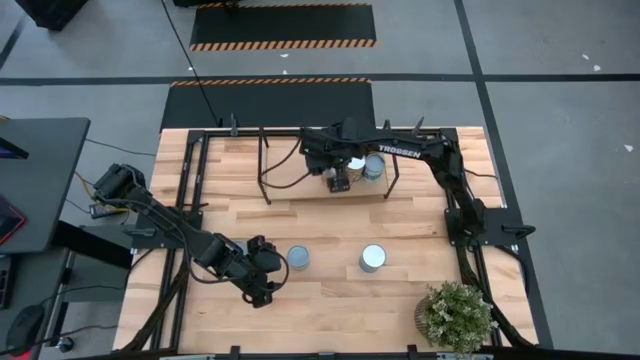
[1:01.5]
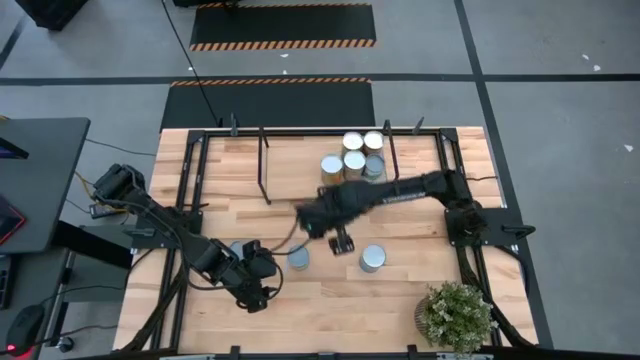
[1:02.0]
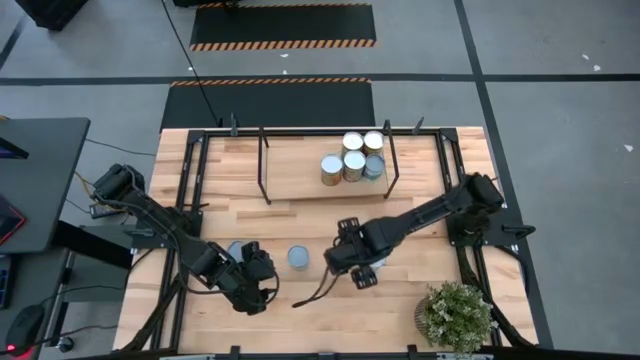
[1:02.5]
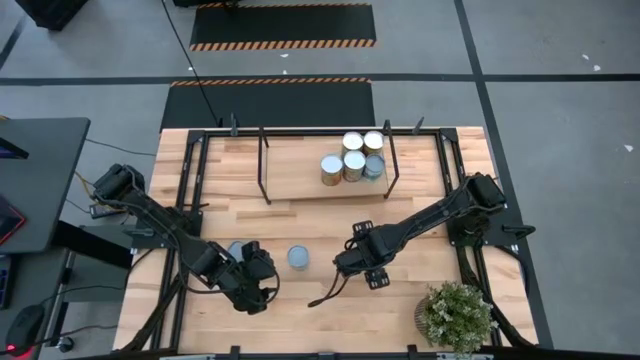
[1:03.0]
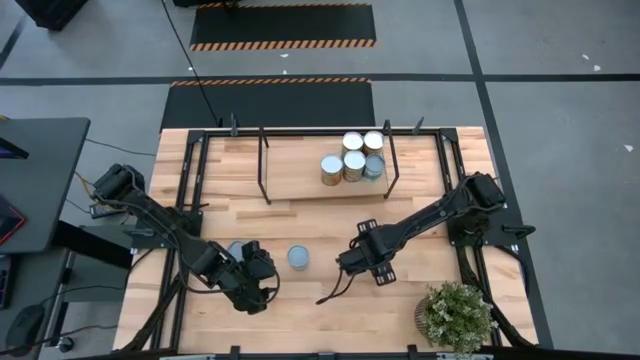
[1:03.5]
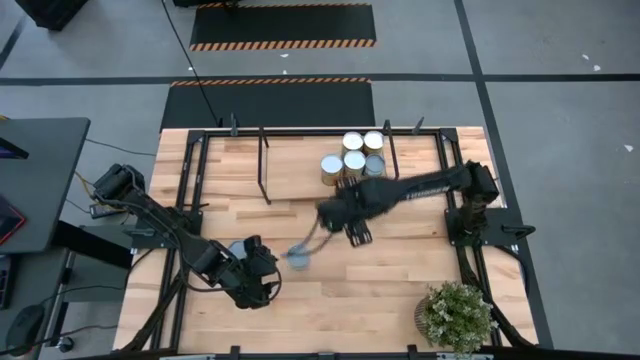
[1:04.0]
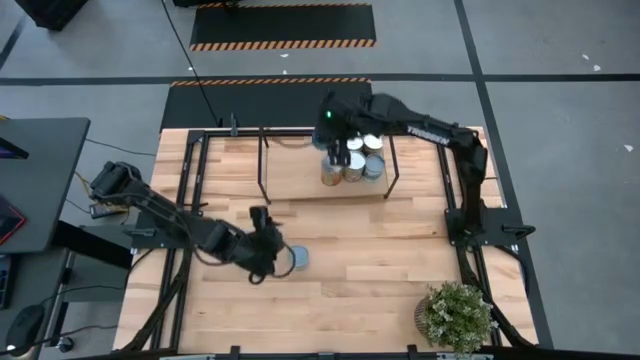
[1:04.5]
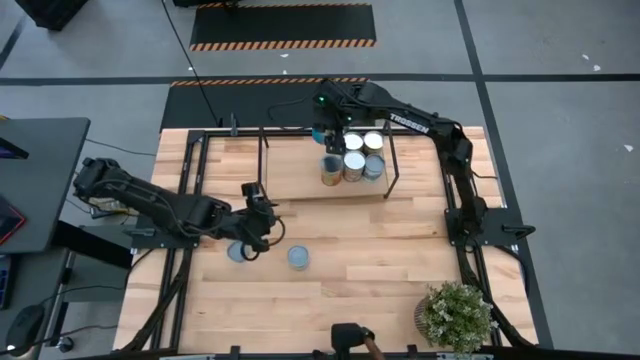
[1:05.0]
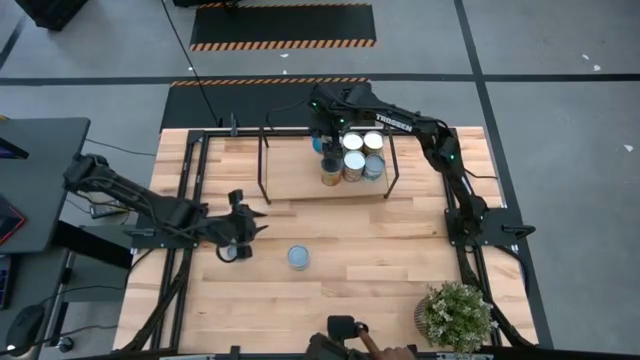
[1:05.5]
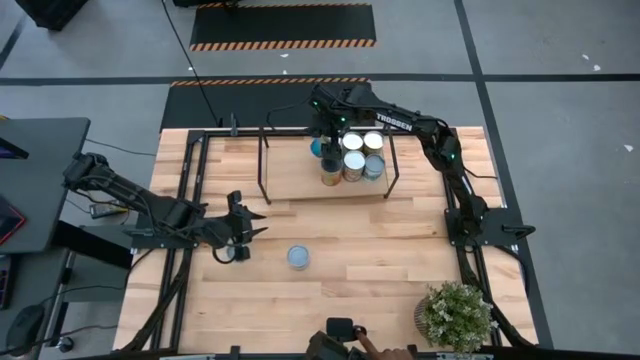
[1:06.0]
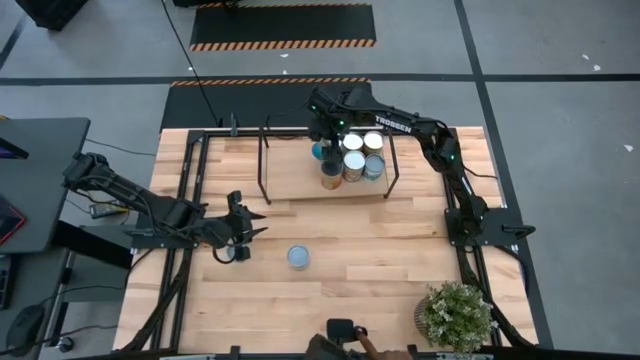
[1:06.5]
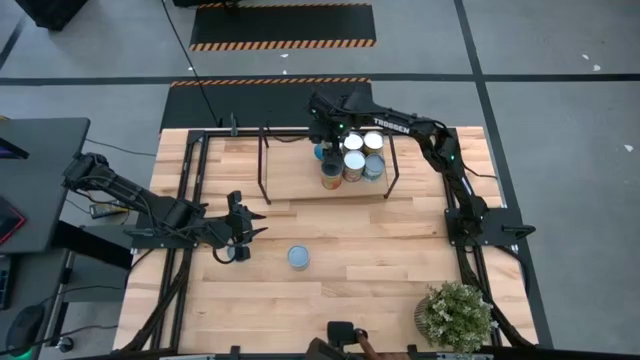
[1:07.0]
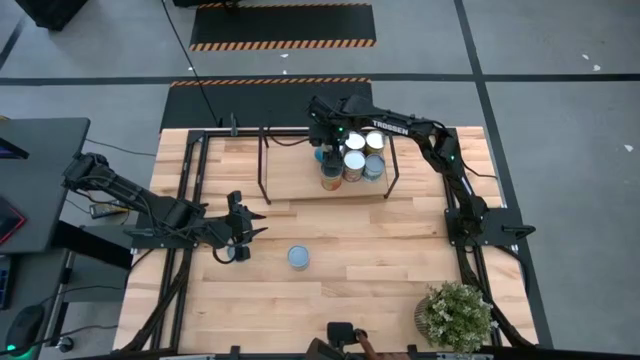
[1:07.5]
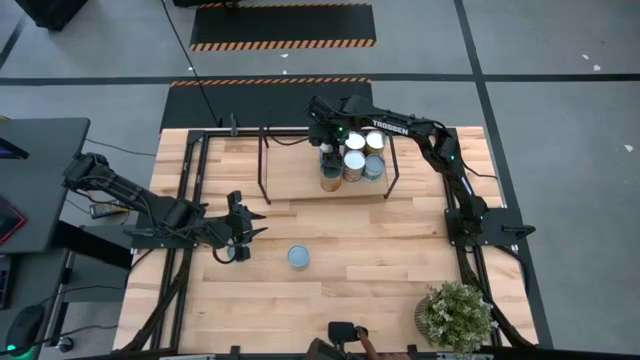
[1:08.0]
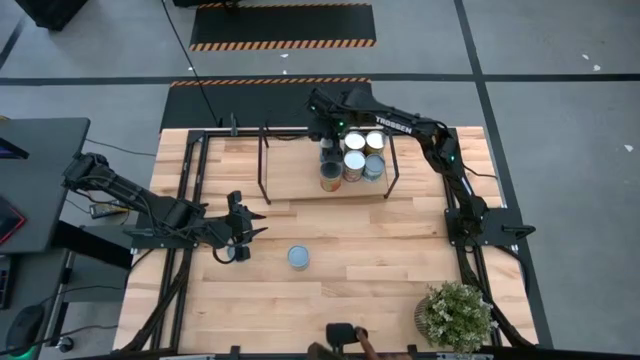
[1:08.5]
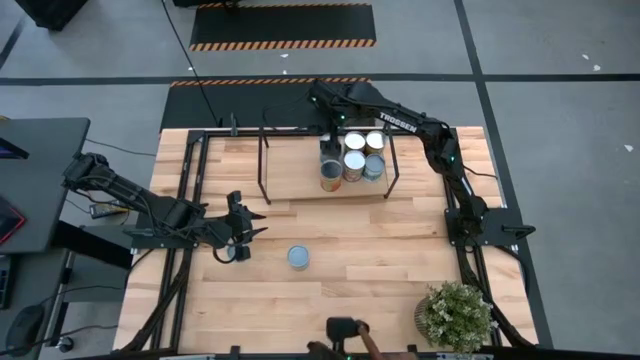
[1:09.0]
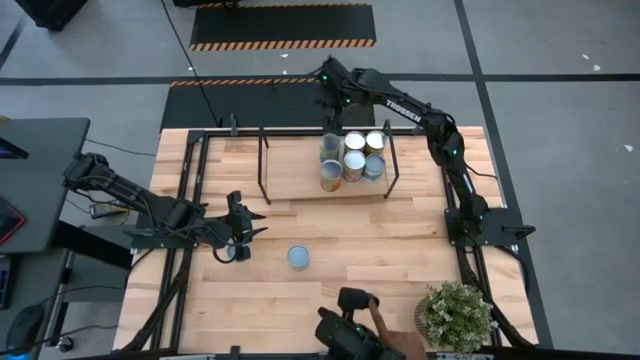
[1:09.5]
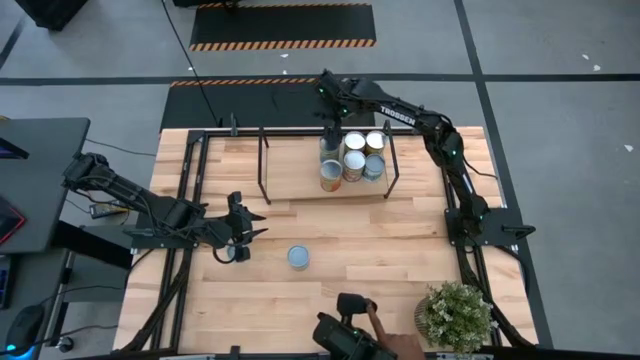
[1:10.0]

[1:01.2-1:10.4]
Task: Pick and place cans onto a shelf
Put the canned cherries on the shelf

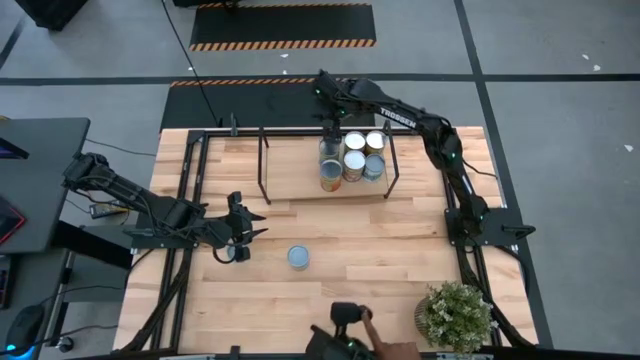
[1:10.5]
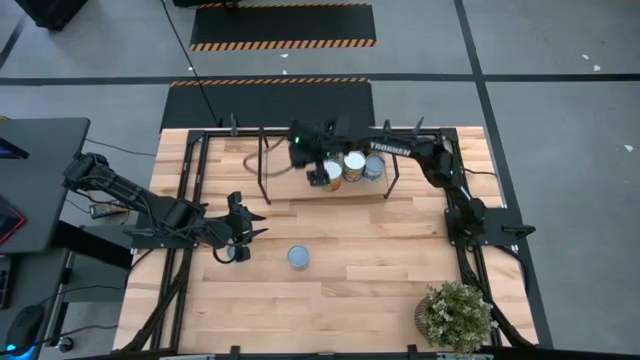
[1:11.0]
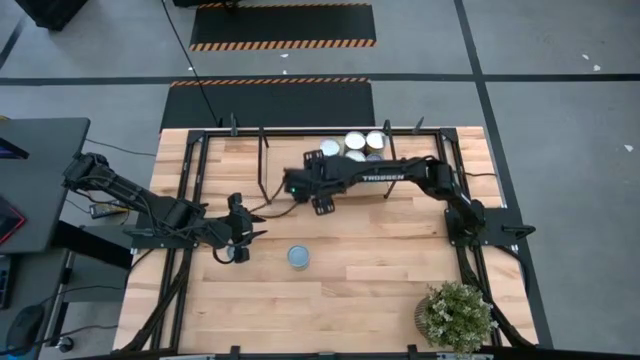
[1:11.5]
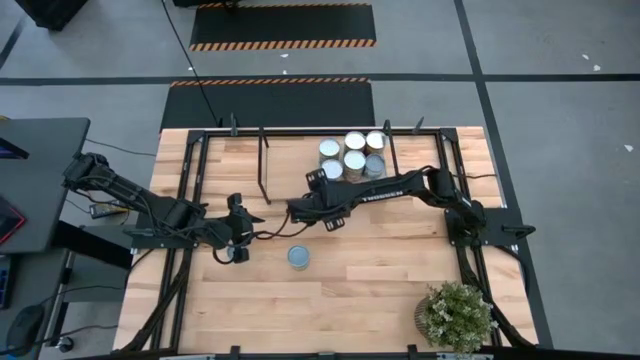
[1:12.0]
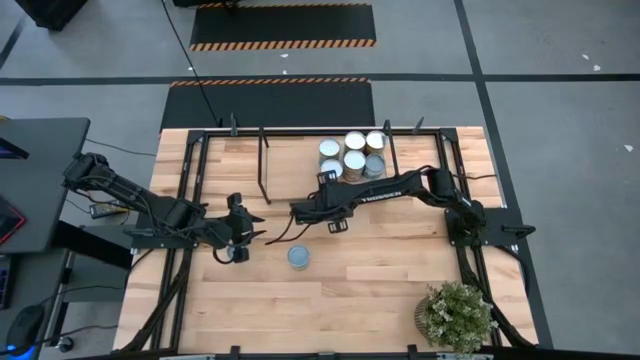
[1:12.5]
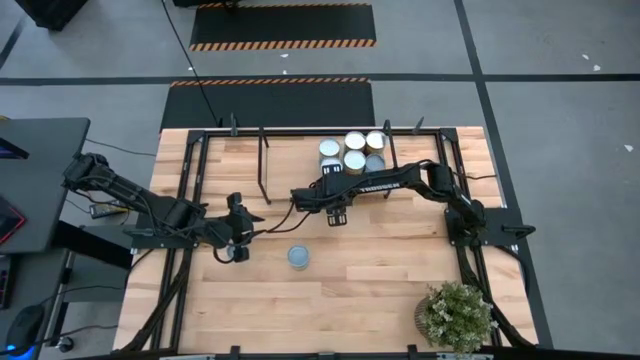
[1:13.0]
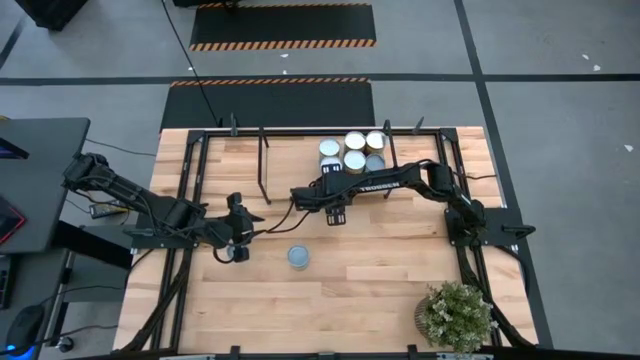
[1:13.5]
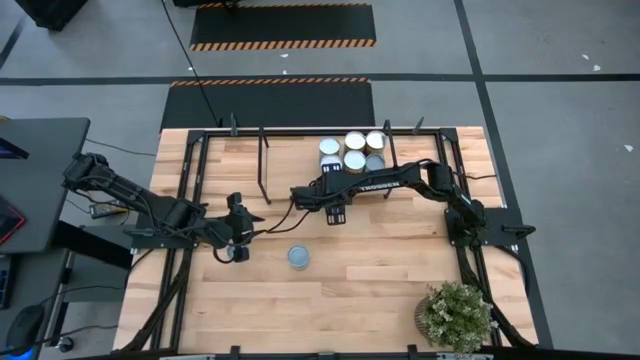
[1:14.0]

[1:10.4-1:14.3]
Adjust the canned pineapple on the shelf

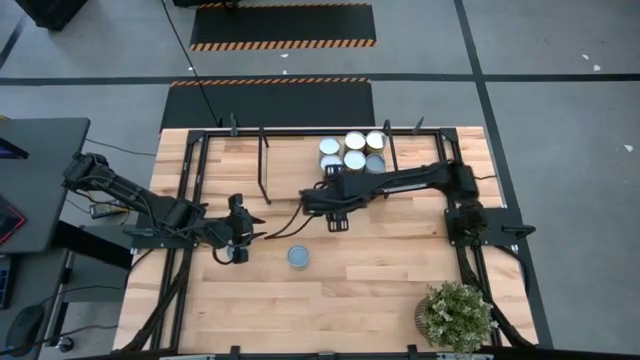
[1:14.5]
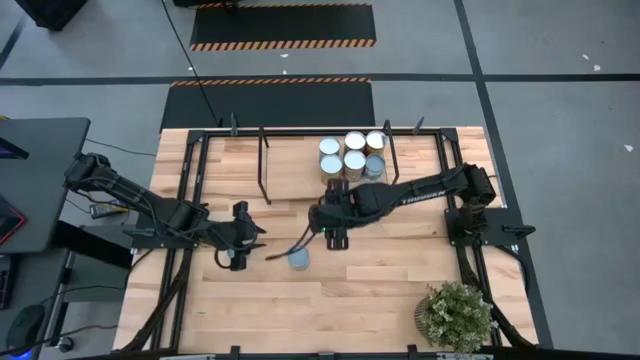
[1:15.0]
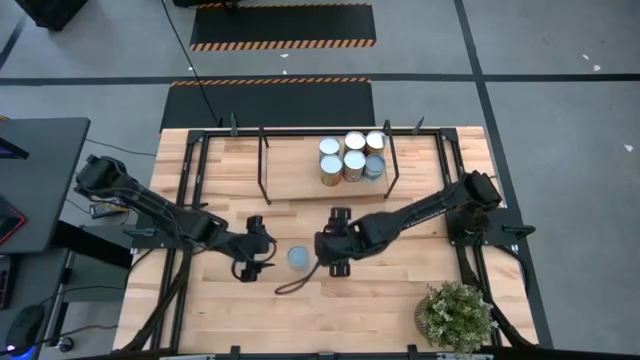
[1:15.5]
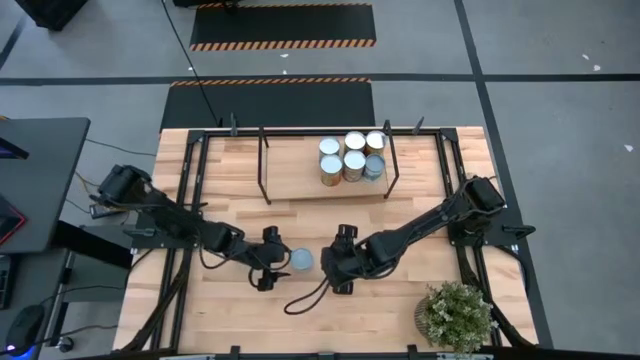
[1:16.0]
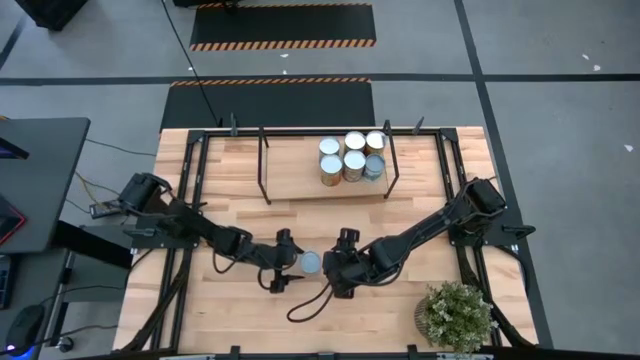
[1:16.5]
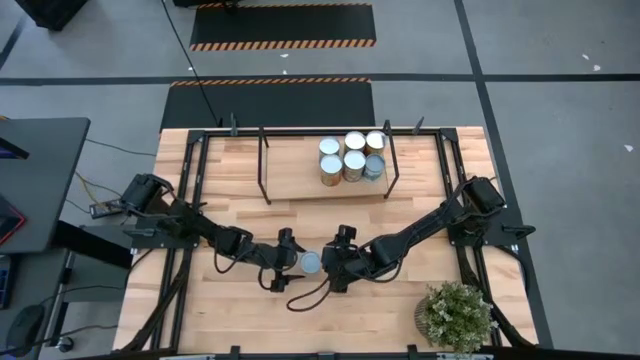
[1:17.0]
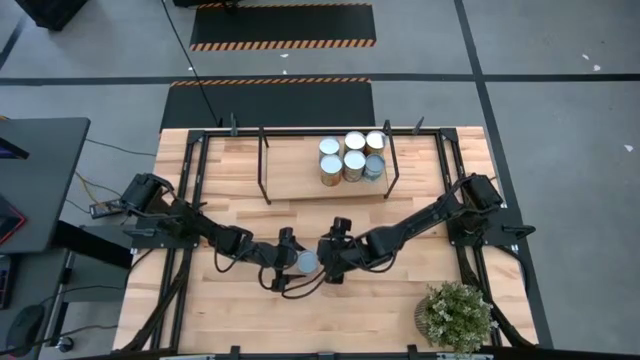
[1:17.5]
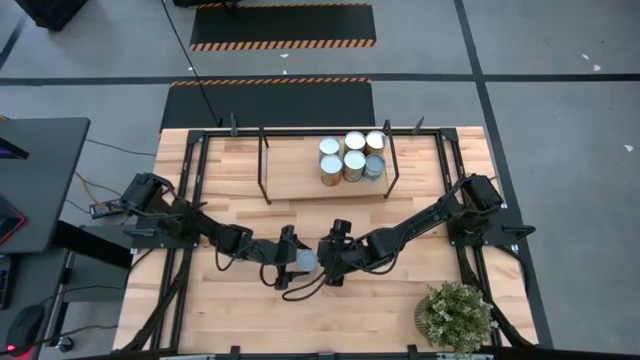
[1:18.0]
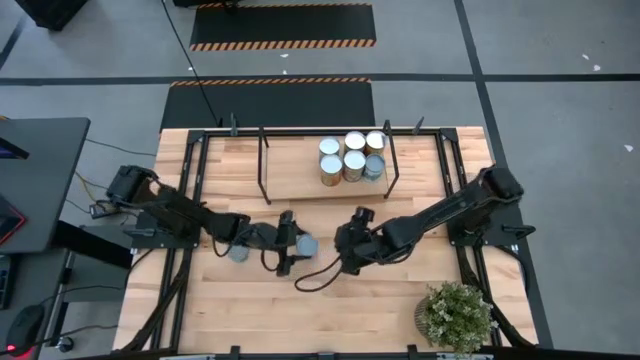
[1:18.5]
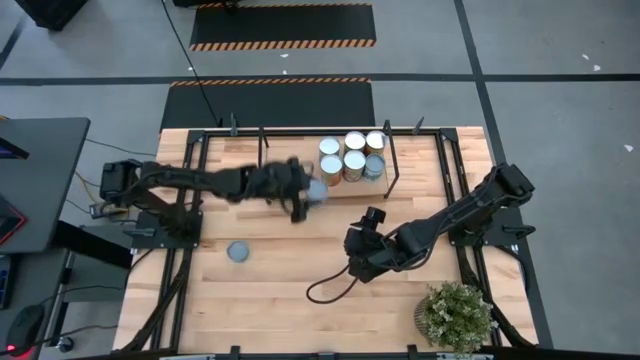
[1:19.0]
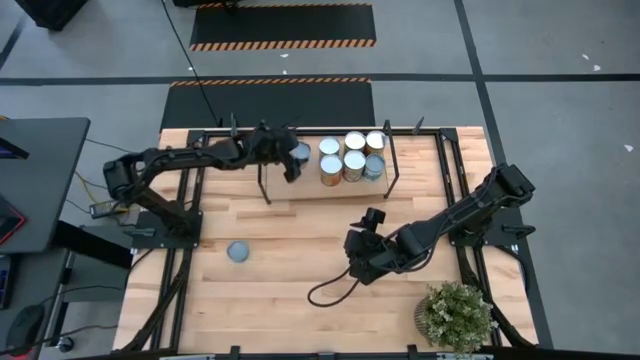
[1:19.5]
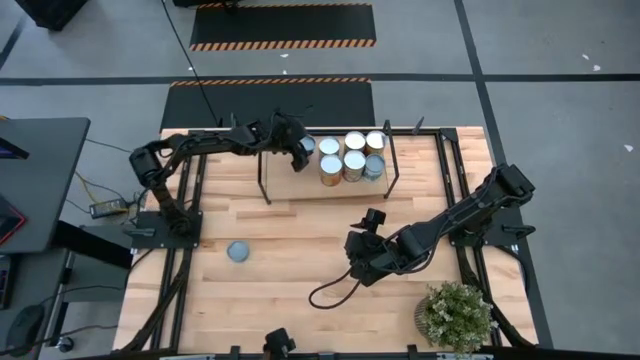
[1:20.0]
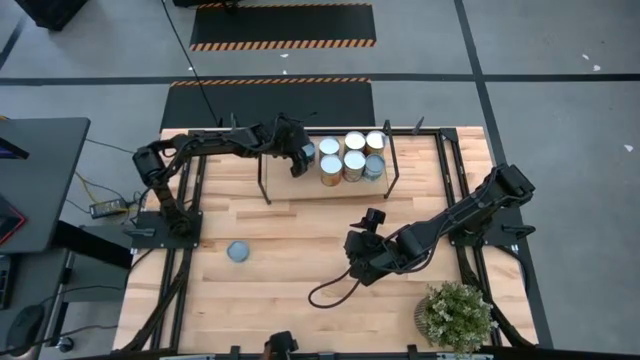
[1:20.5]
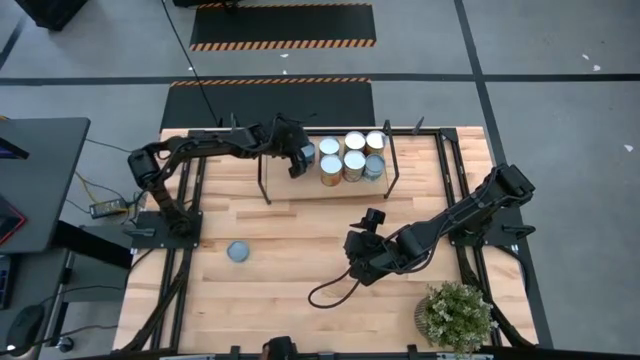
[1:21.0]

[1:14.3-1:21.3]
Put the canned chicken soup on the shelf

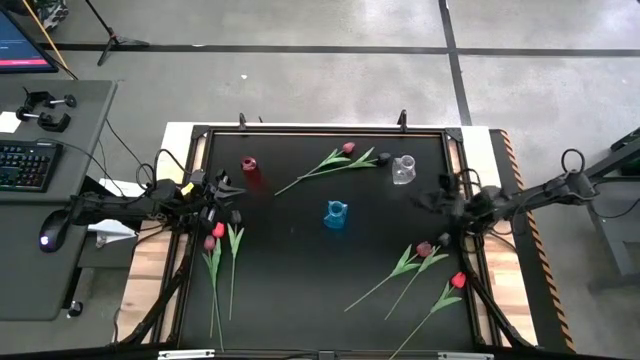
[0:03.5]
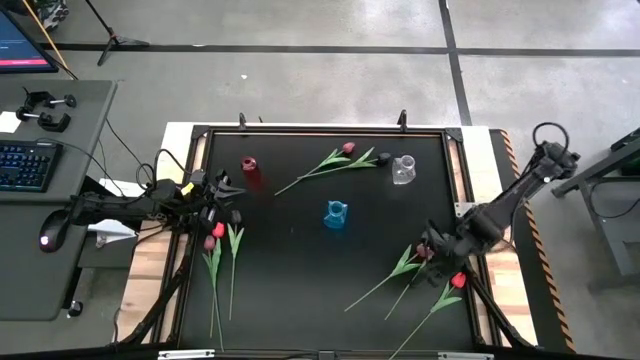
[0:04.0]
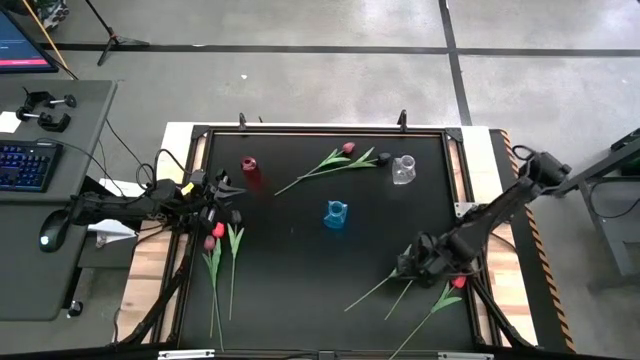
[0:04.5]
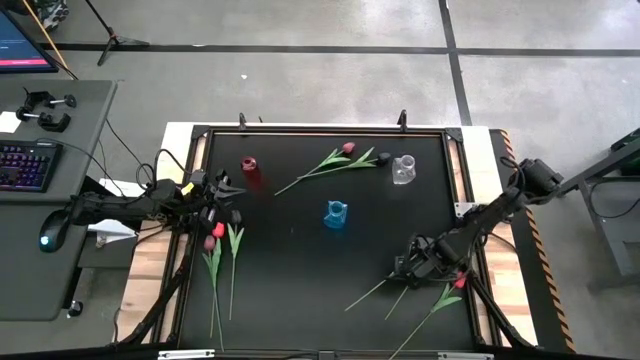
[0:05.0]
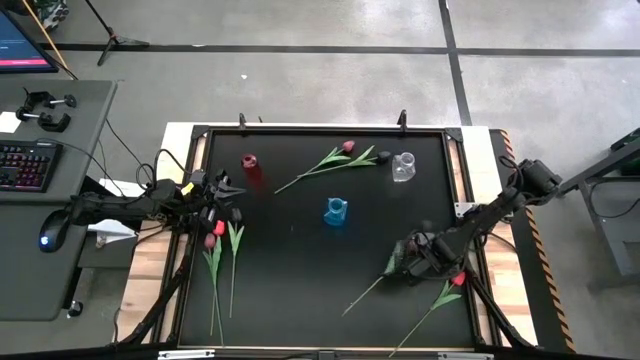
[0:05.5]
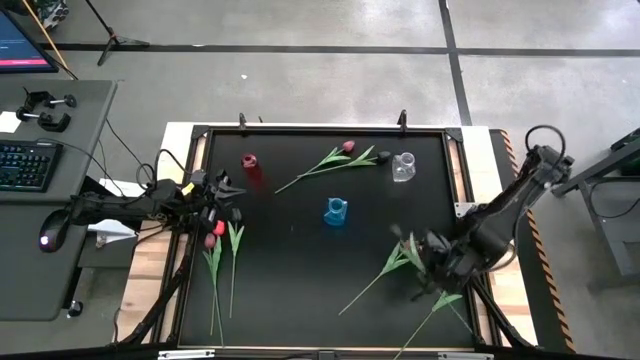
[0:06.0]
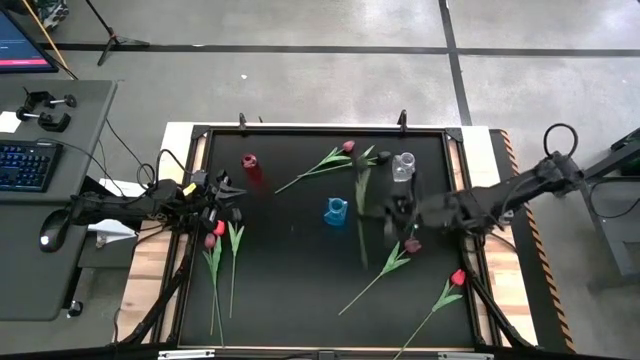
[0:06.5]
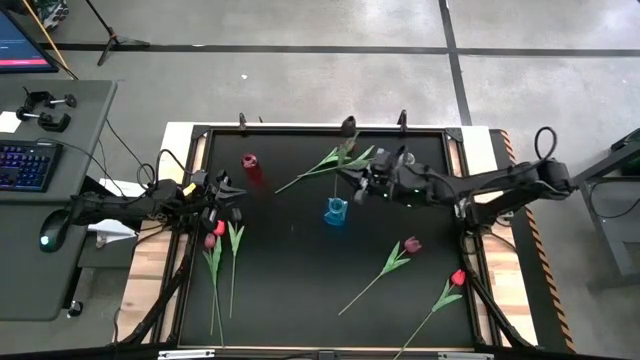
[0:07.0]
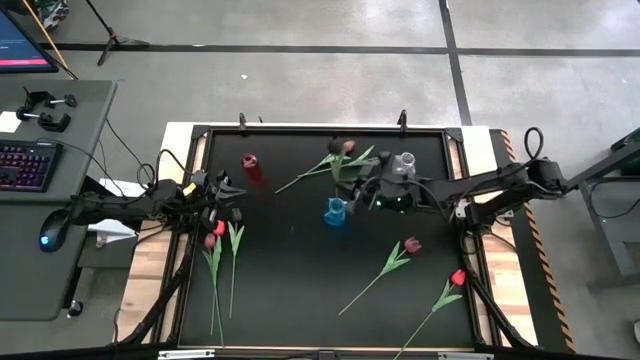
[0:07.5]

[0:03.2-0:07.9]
Task: Sort flowers into vase by color
Put the right black tulip into the blue flower vase
